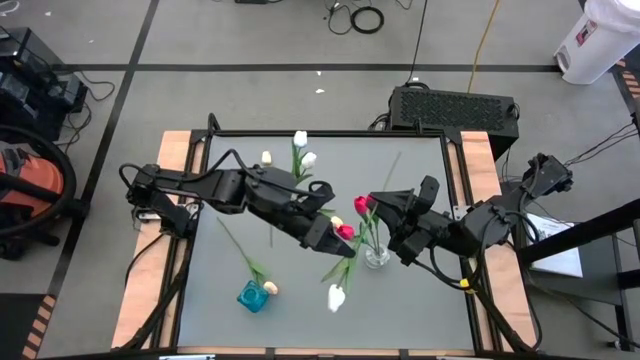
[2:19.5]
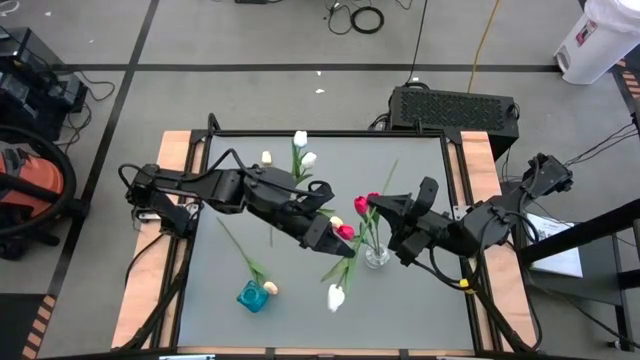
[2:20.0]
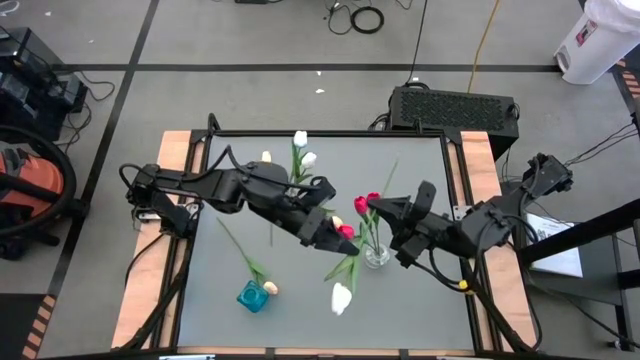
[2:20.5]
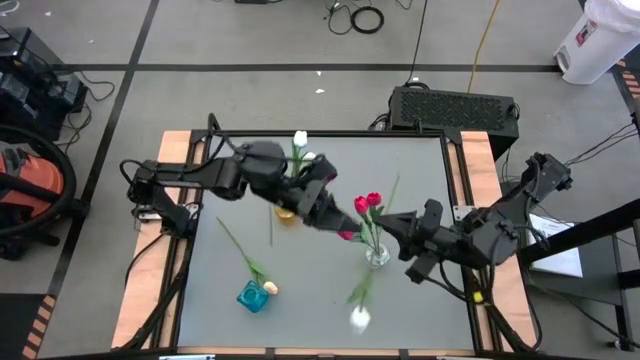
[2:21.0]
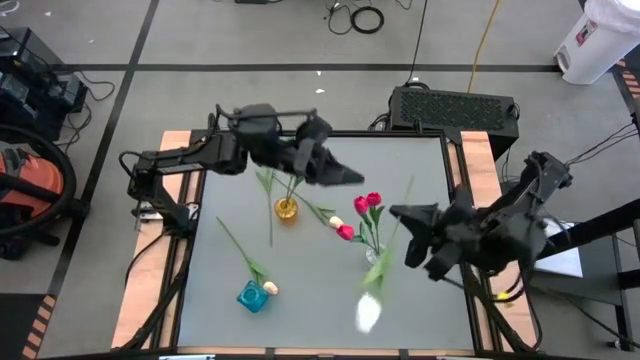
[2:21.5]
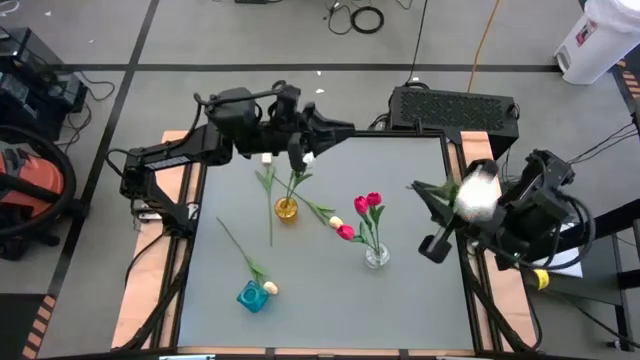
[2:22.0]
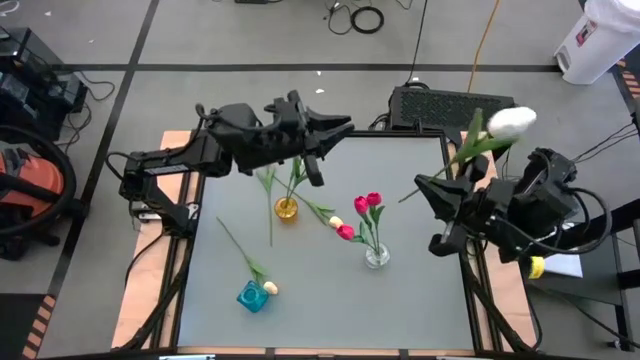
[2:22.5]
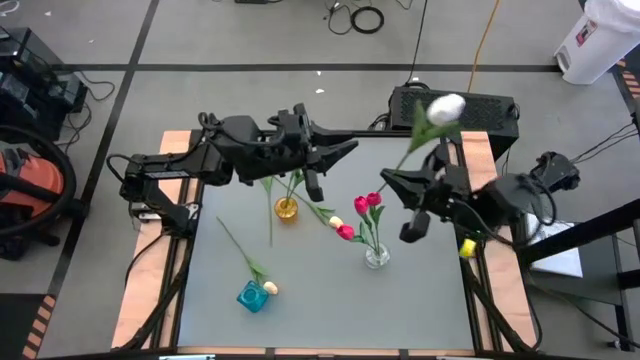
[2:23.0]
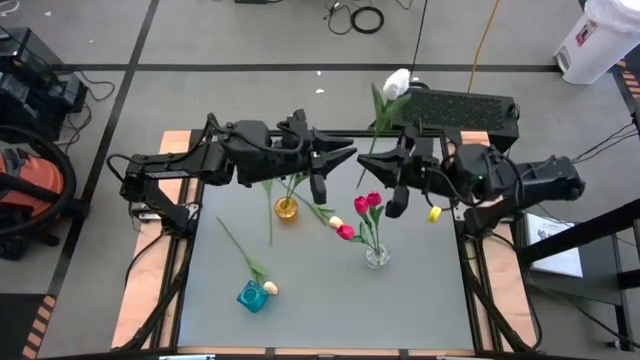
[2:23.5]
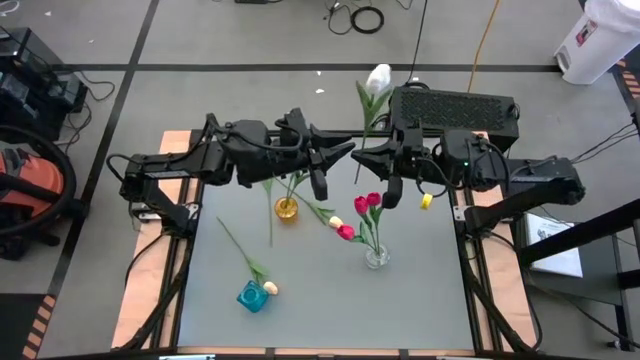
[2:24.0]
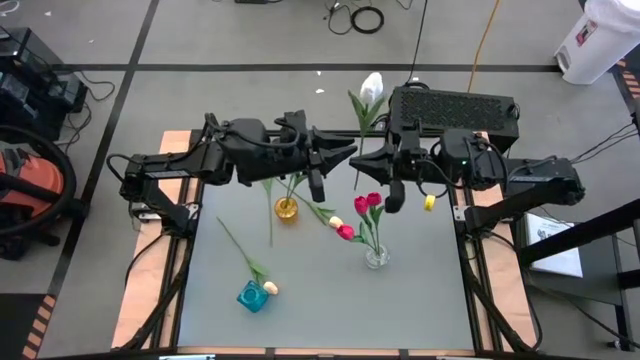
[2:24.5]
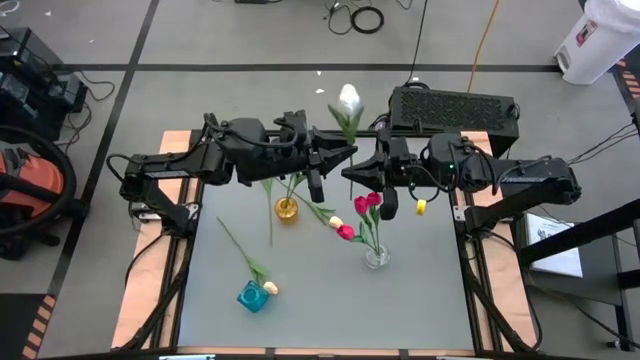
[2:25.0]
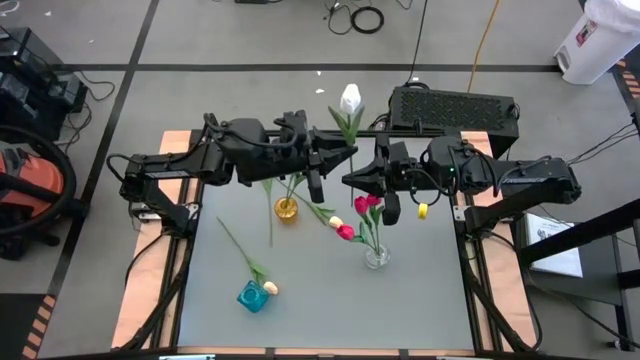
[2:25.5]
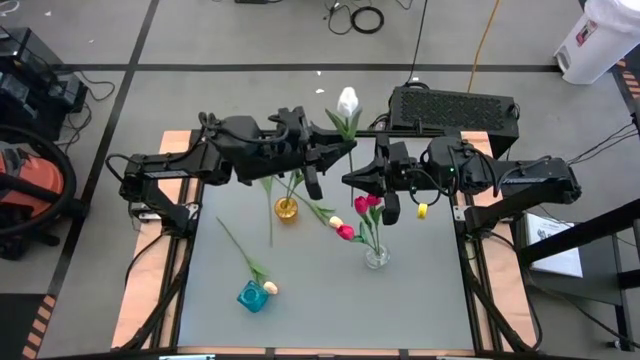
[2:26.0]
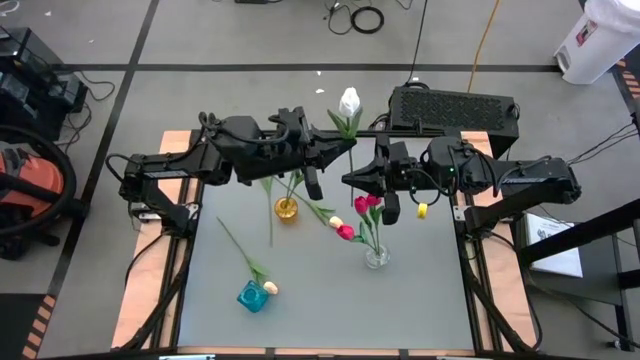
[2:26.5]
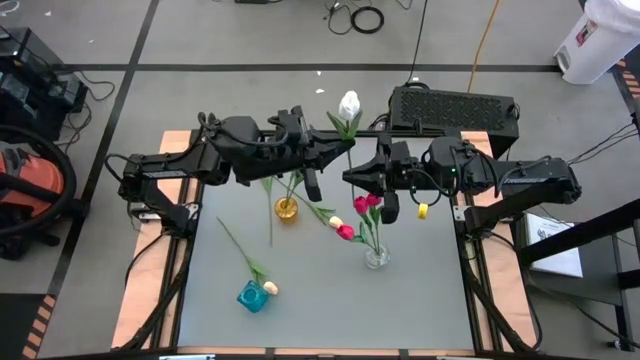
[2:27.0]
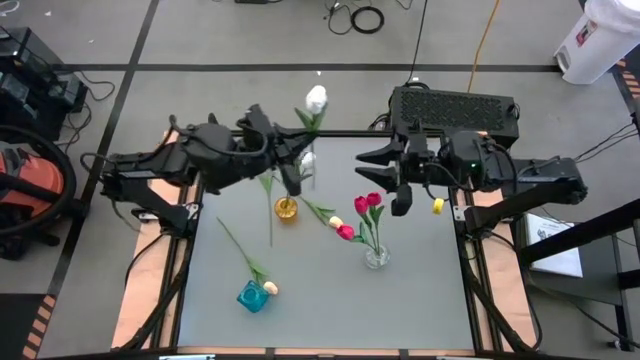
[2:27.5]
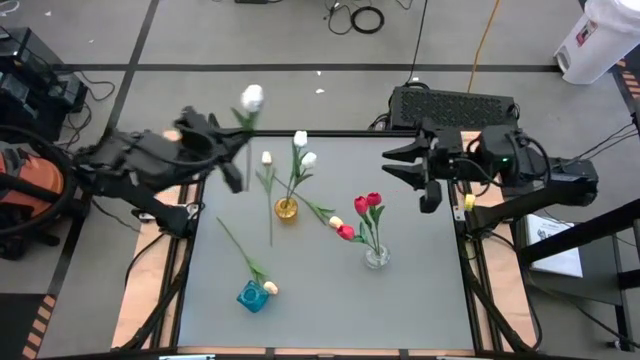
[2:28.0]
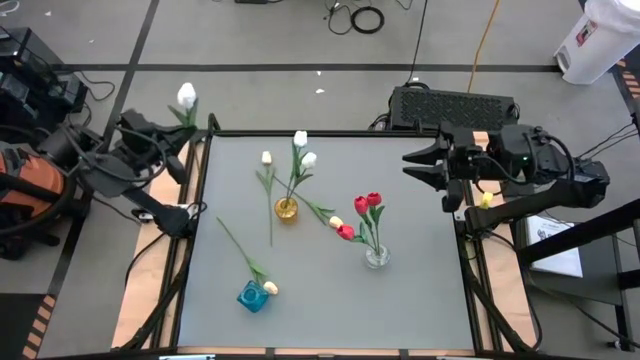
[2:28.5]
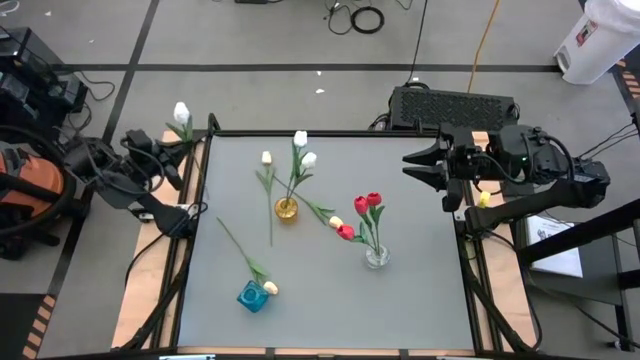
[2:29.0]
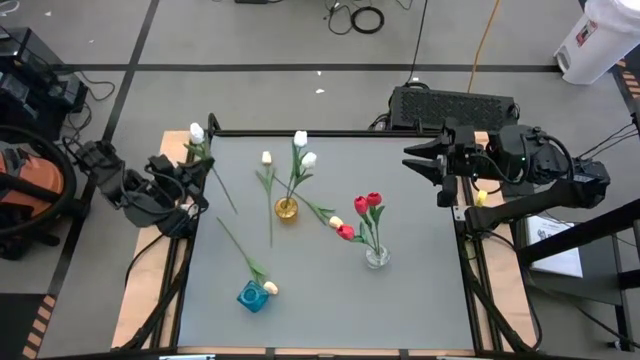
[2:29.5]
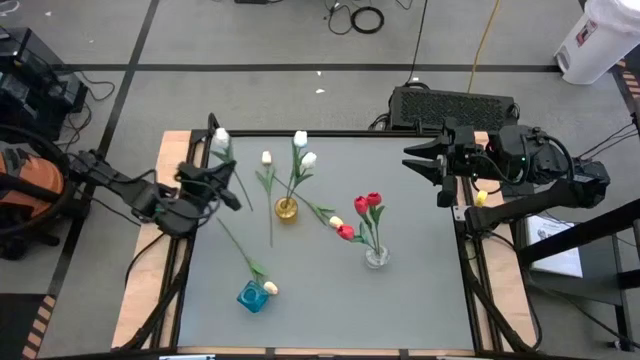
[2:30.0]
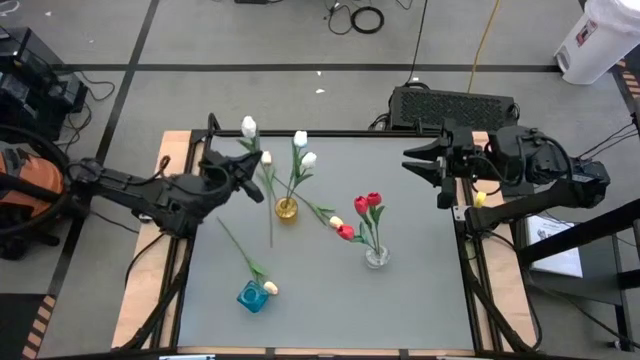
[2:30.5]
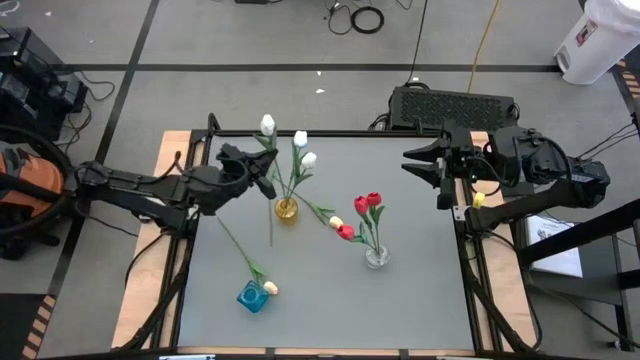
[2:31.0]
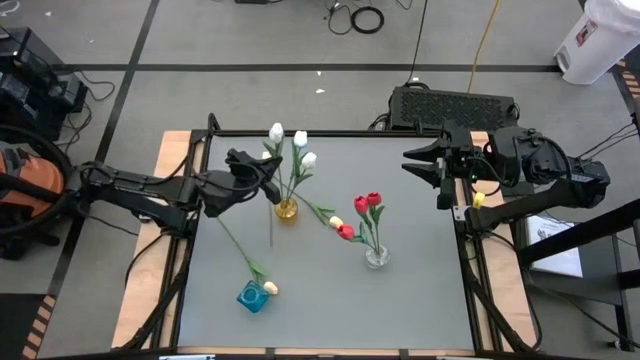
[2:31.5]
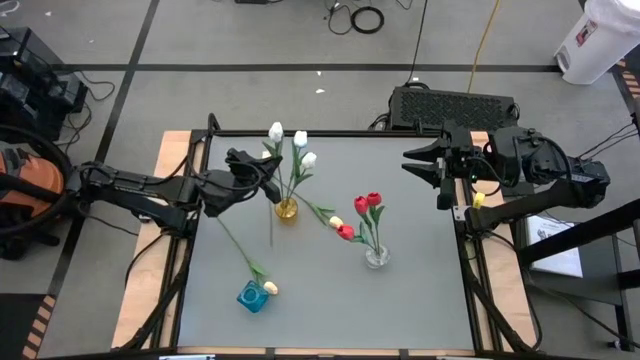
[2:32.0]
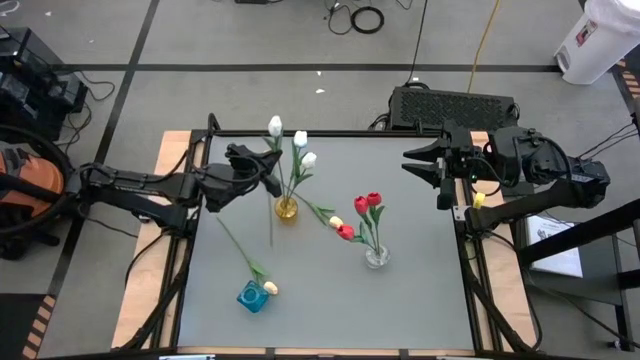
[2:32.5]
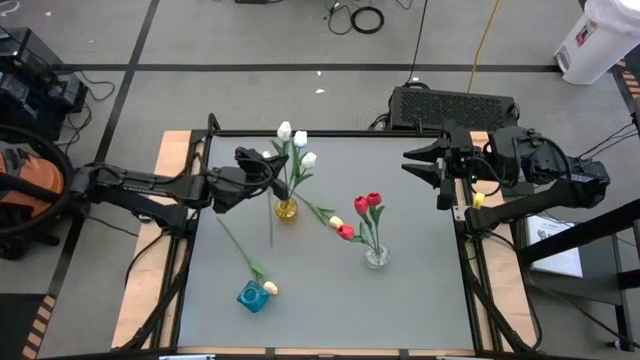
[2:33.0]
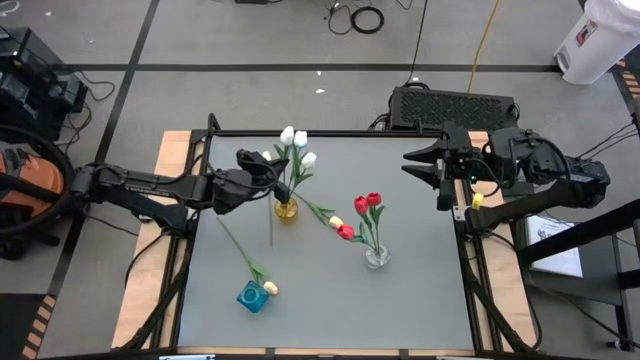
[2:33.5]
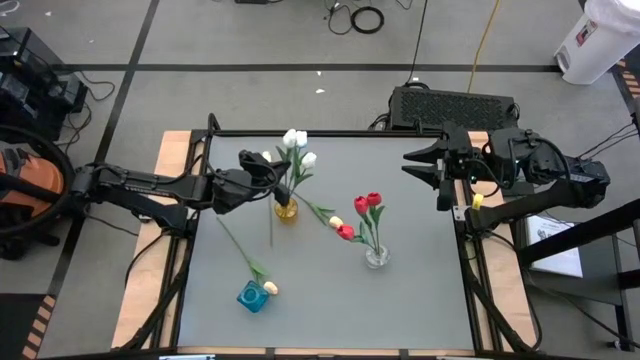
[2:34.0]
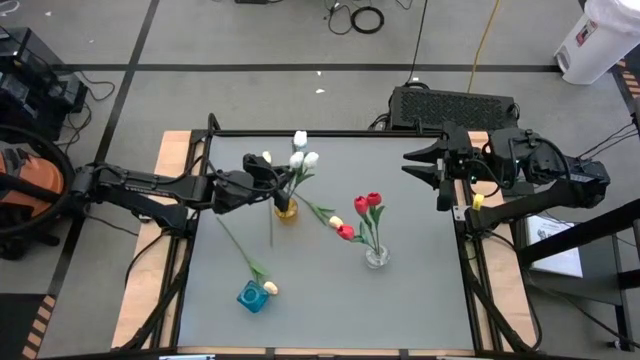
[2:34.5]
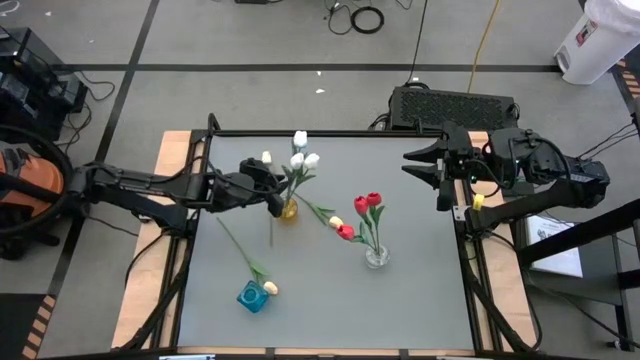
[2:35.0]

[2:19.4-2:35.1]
Task: Sort flowers into vase by color
Put the white tulip into the yellow vase

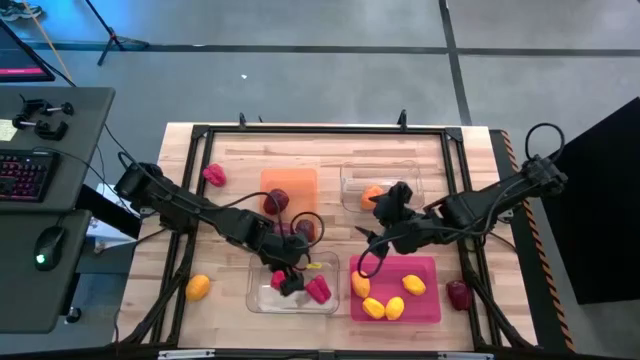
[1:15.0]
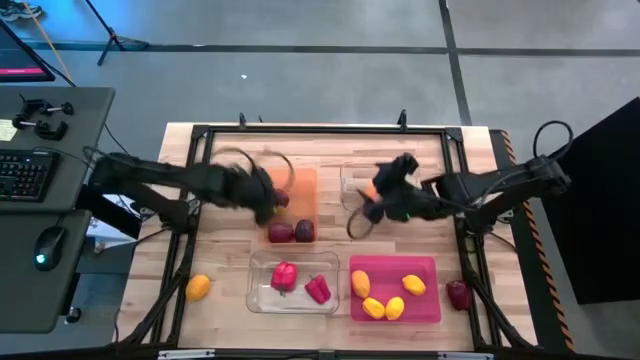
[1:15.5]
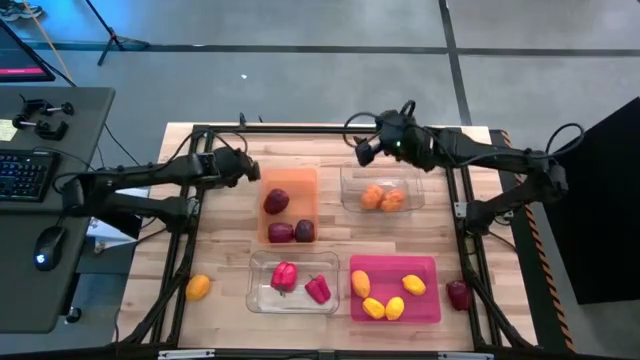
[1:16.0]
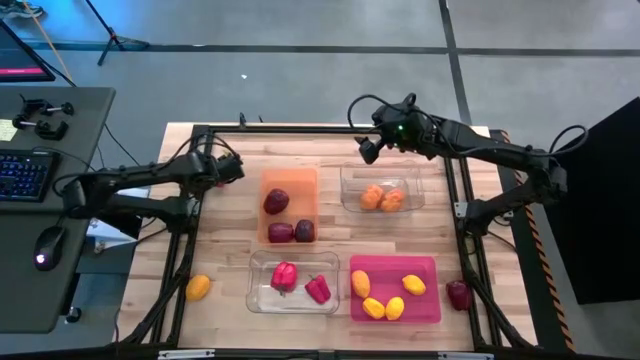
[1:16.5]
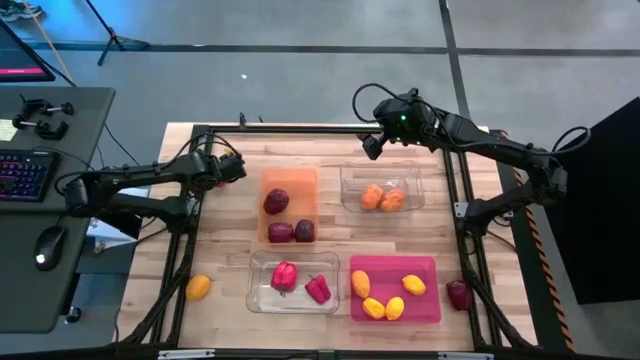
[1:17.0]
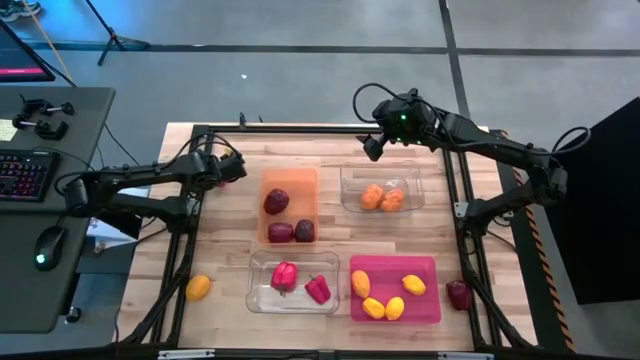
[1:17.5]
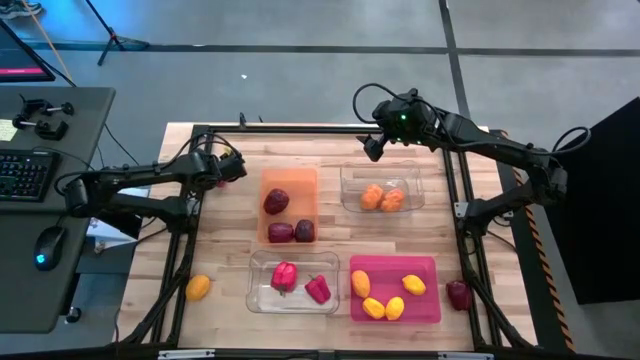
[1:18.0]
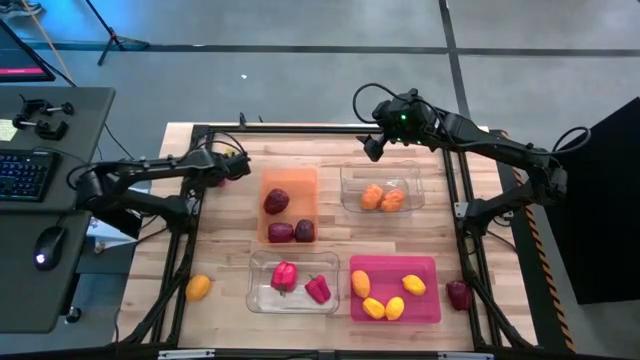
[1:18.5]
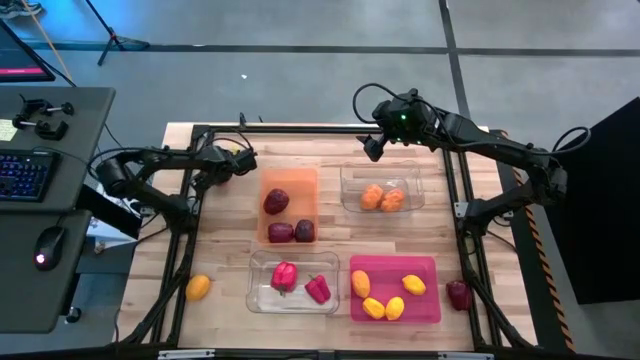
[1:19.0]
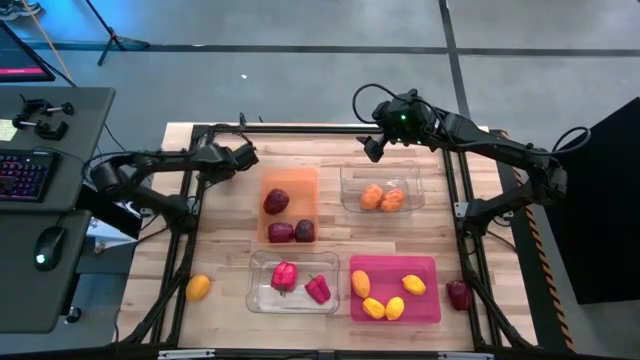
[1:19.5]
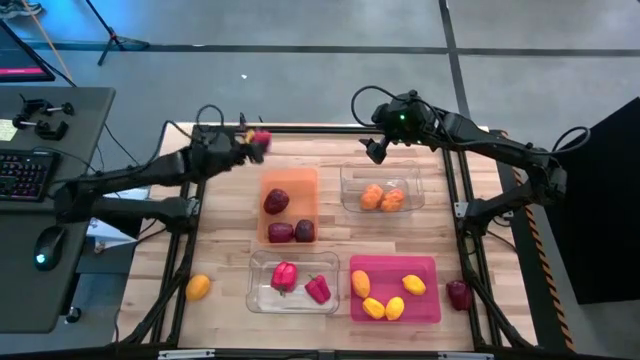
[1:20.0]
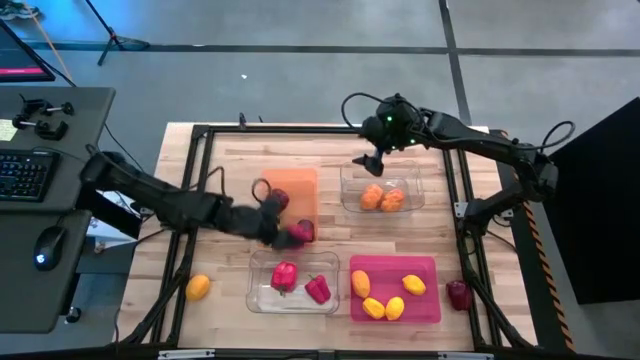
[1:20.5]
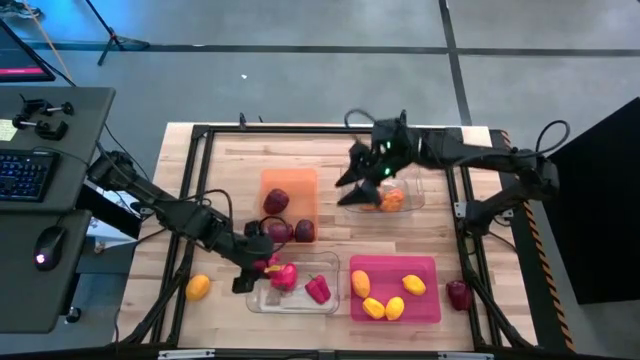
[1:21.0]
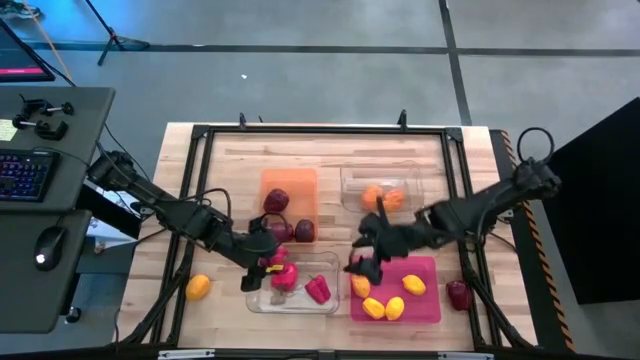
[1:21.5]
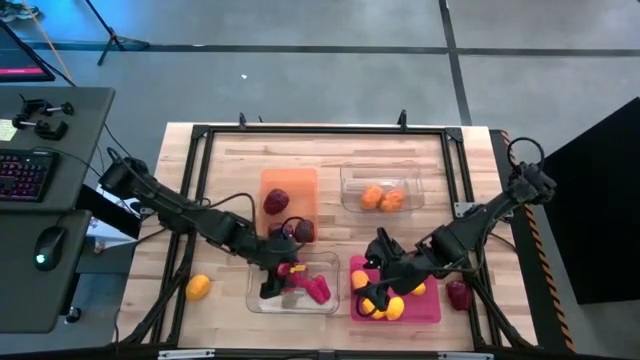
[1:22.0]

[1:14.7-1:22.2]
Task: Sort produce into baskets
Put the red bell pepper into the bottom transparent bin
